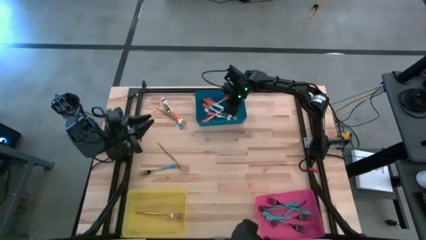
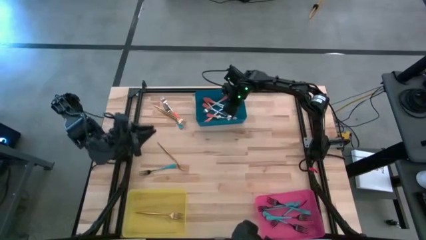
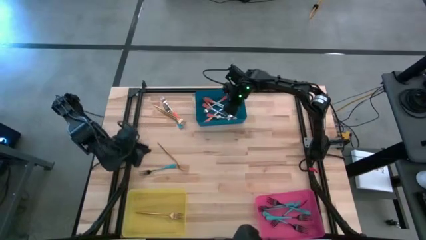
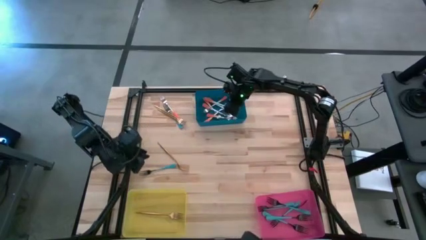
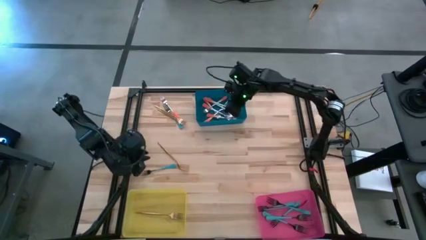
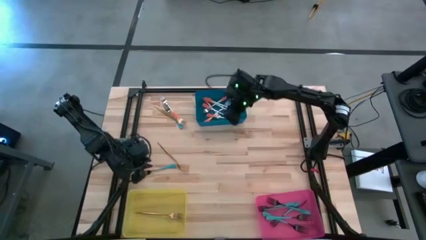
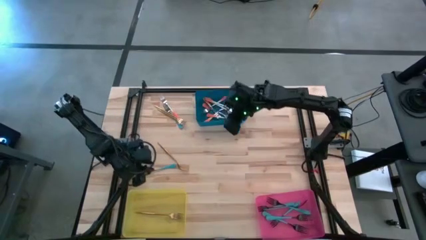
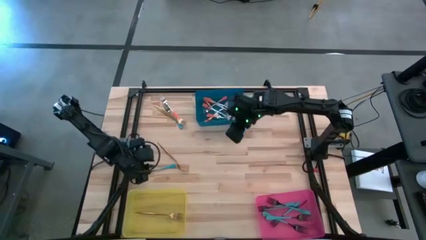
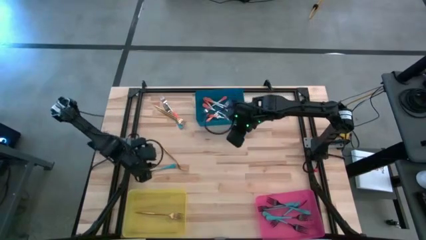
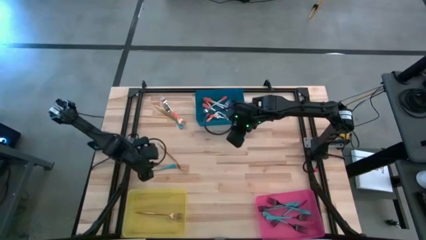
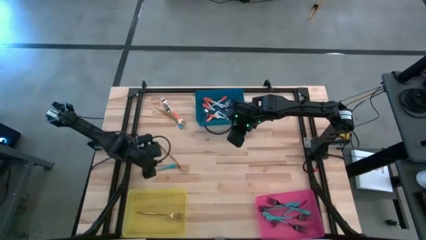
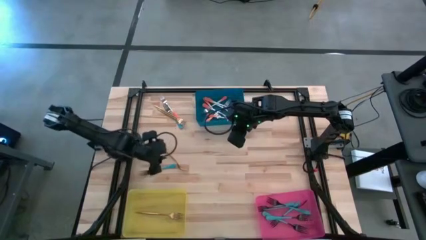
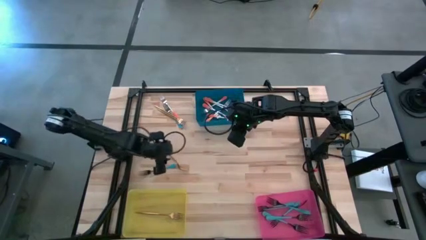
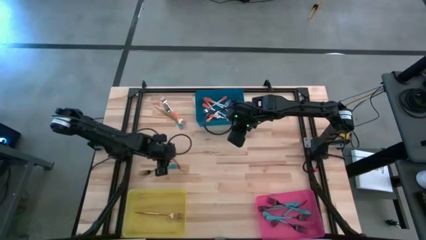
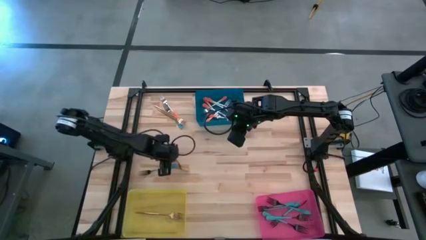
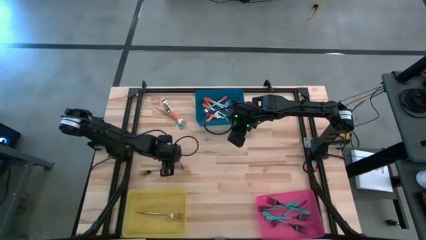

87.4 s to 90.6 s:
Task: Sort silverware by color (type)
Put the gold fork into the yellow bin

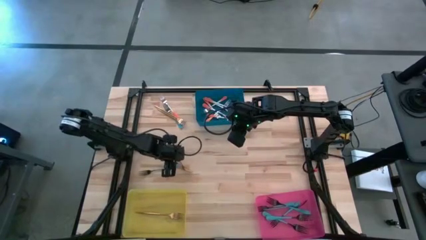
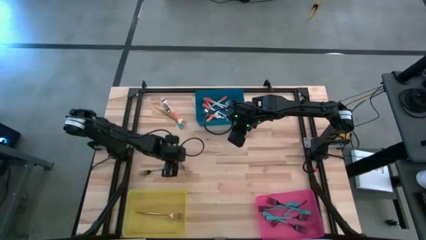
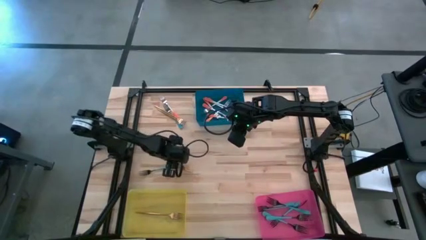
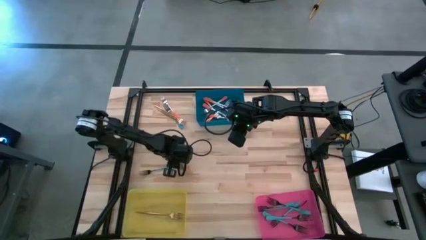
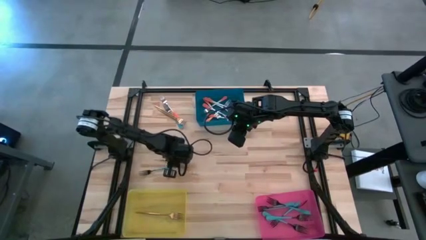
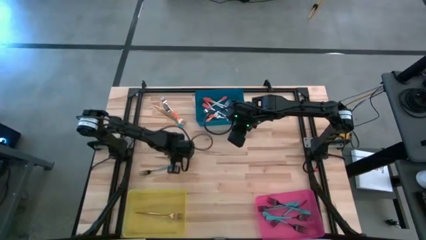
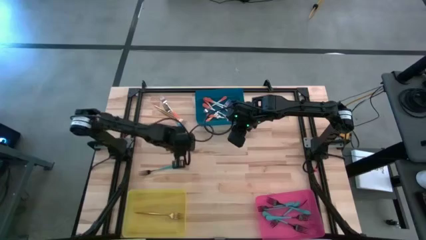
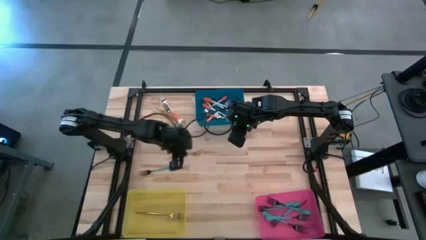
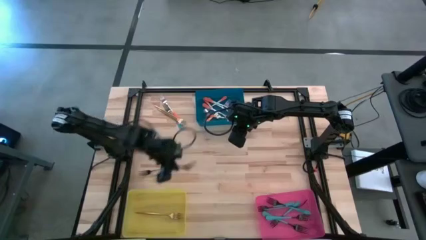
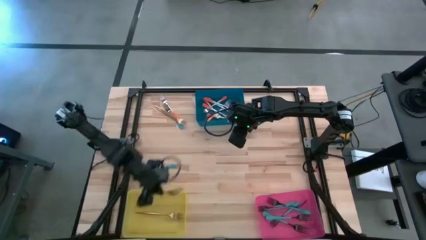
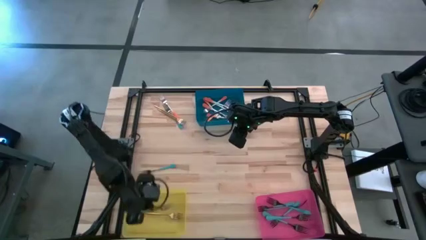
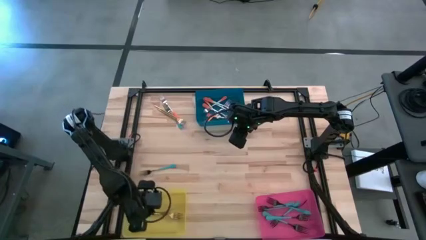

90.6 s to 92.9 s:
Put the gold fork into the yellow bin

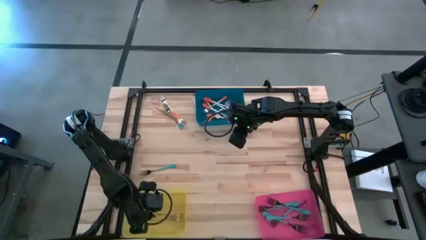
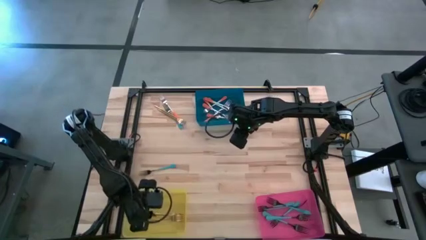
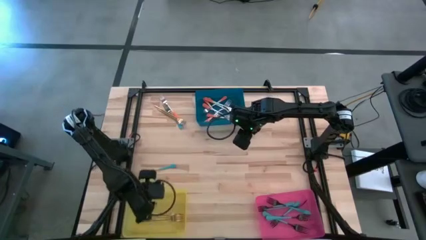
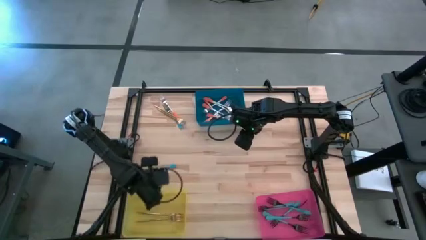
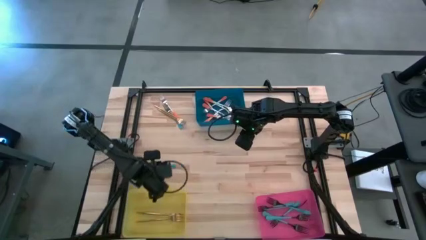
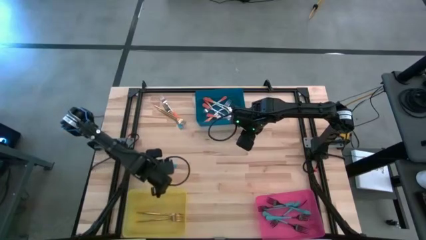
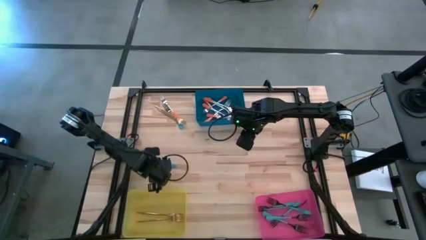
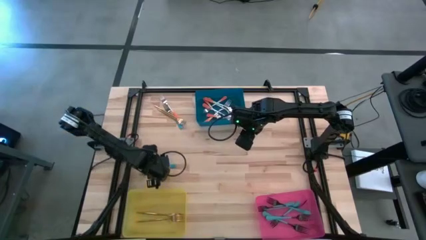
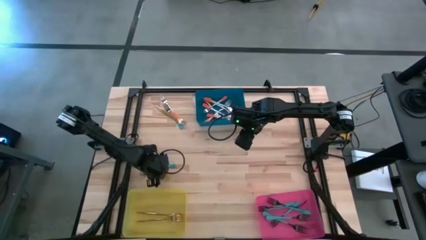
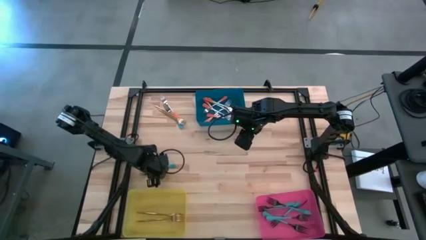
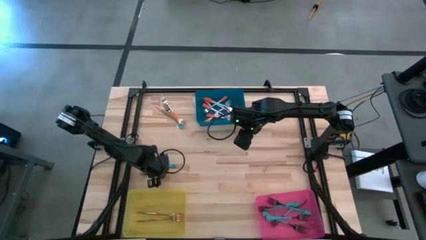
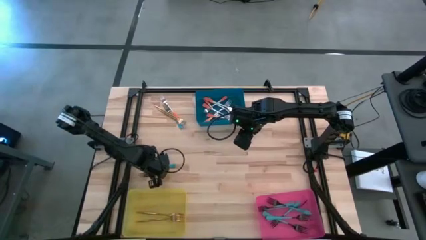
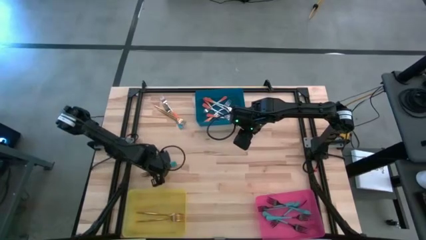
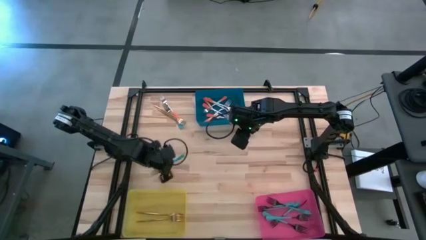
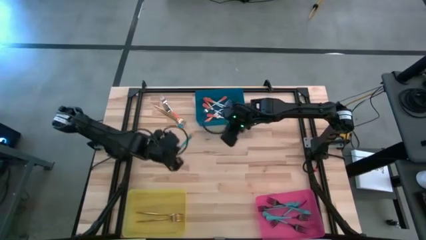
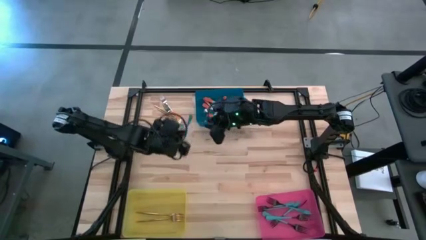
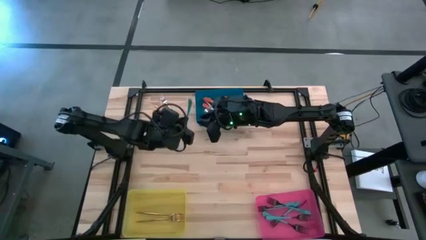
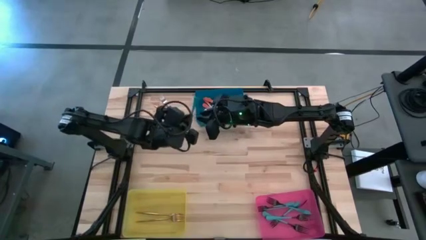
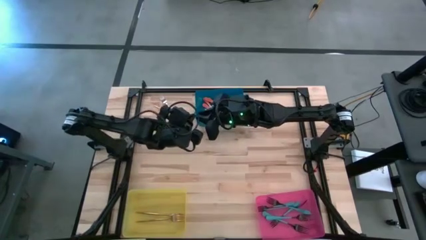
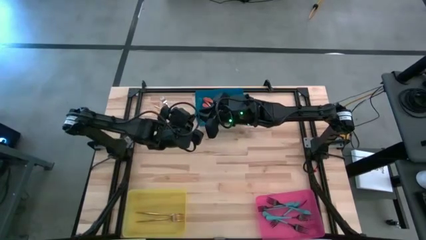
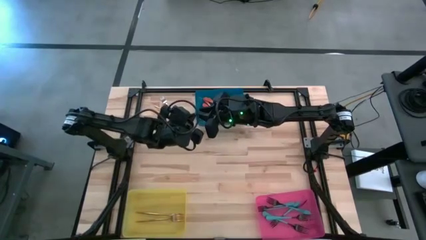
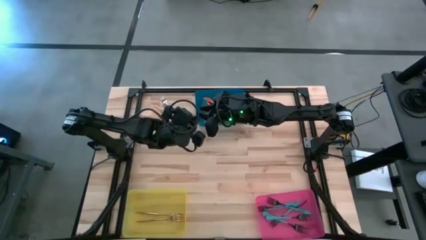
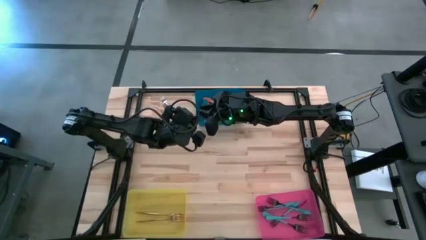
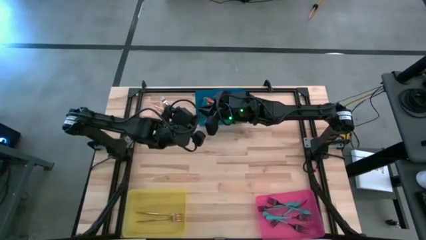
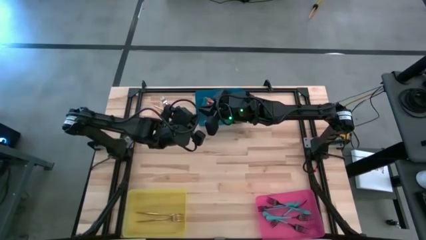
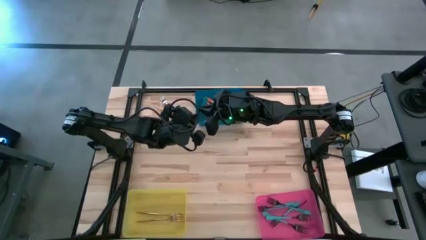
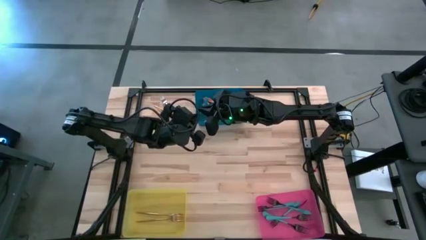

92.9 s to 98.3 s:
Put the blue fork into the pink bin

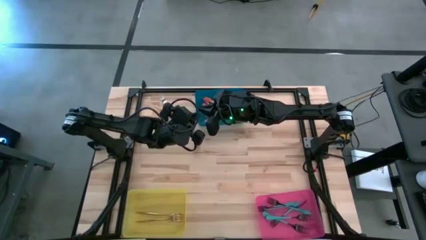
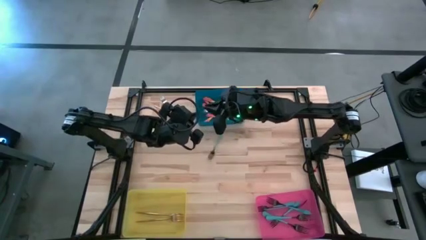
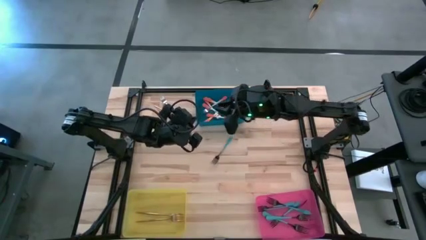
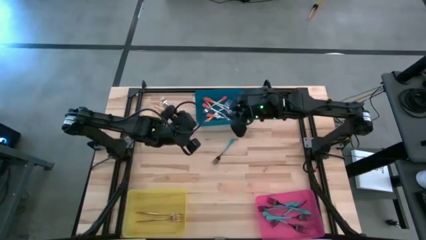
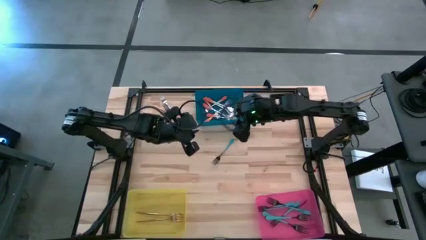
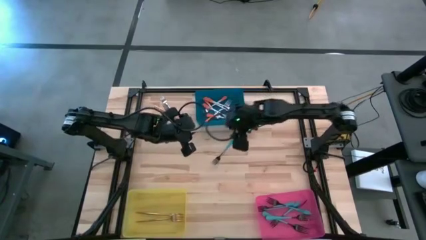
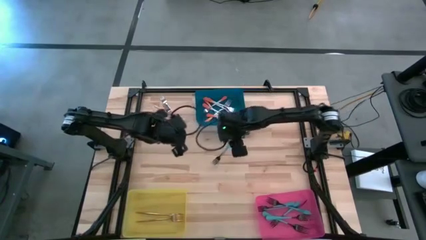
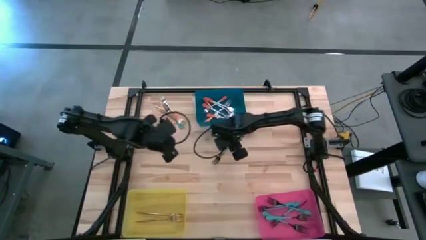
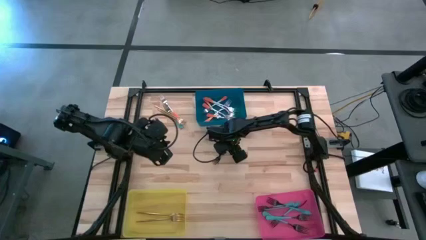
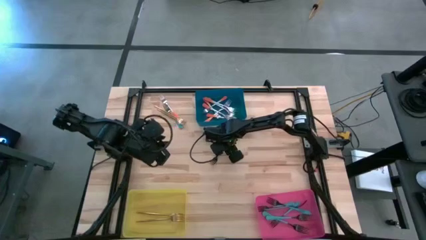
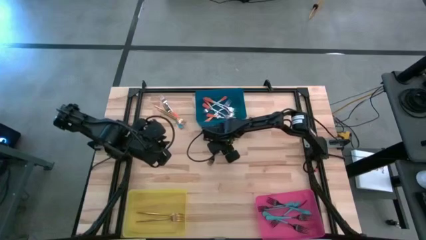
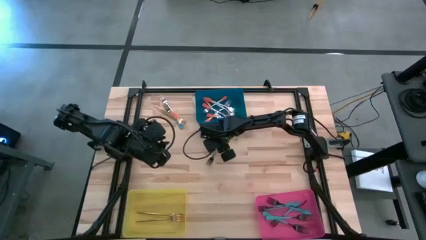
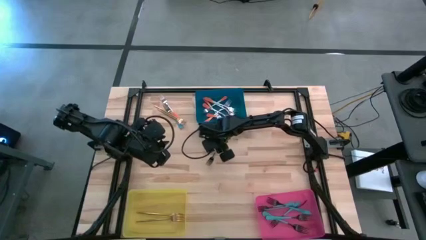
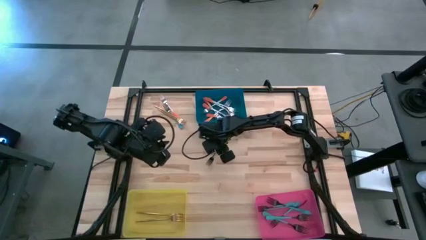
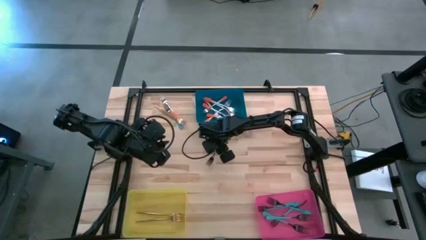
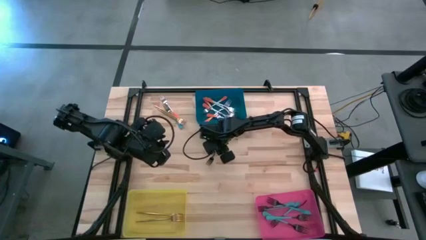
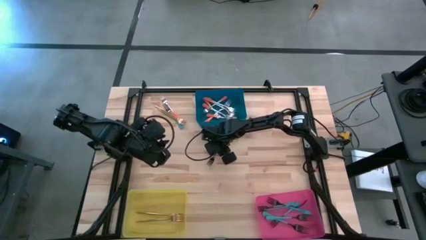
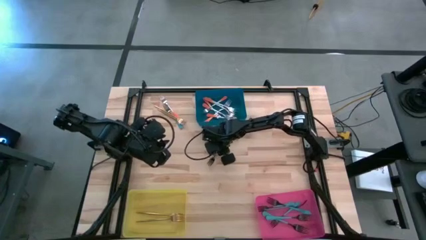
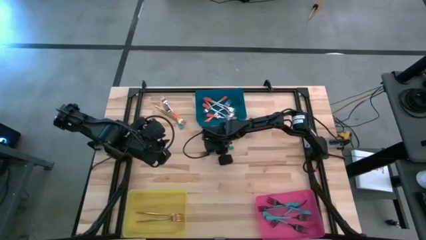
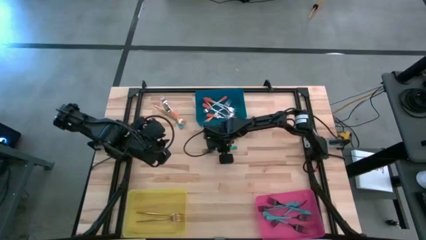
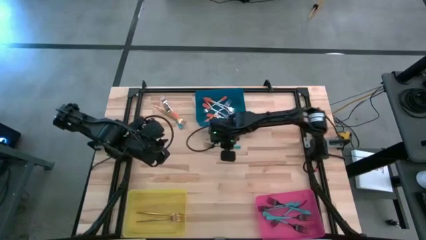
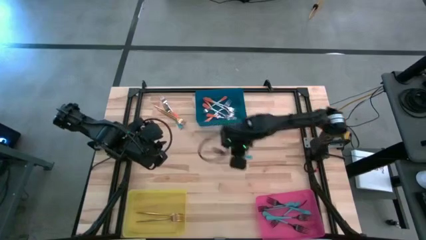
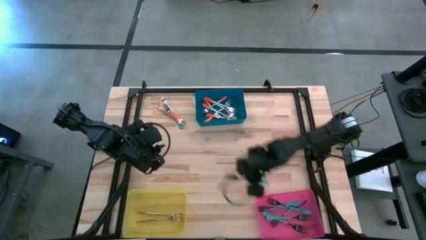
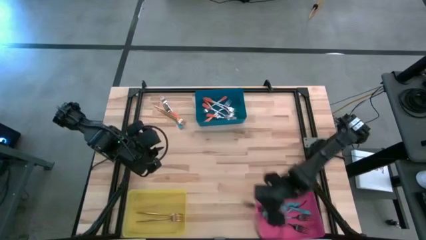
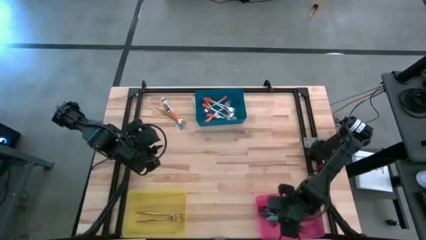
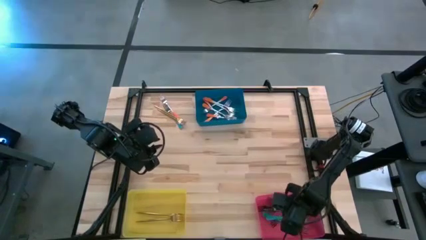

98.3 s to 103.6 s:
Put the blue fork into the pink bin

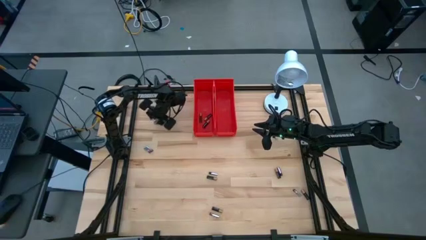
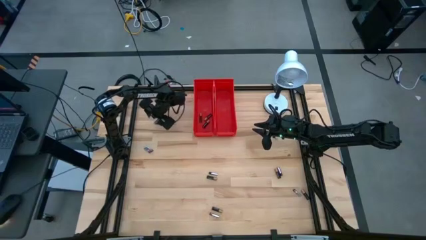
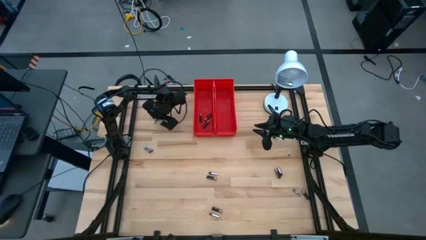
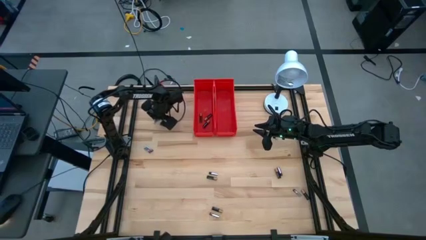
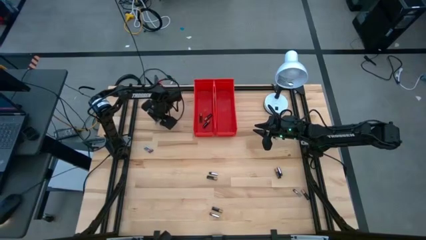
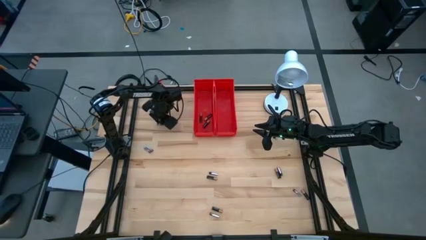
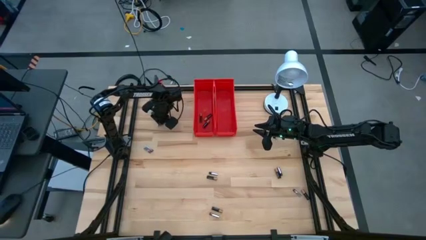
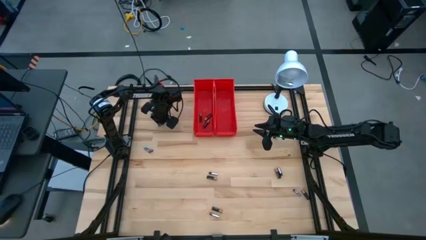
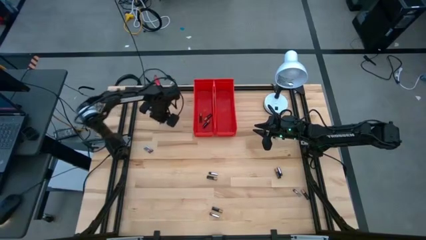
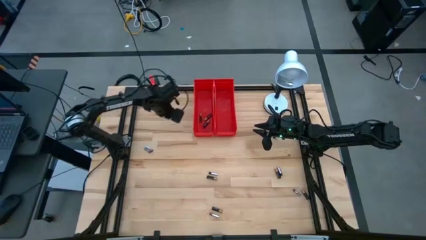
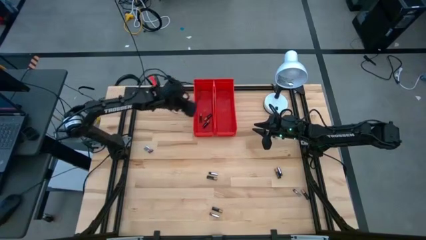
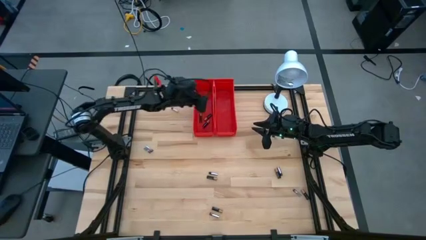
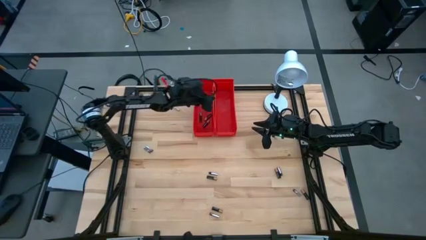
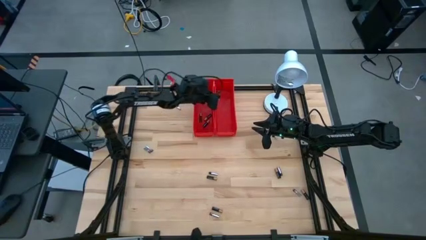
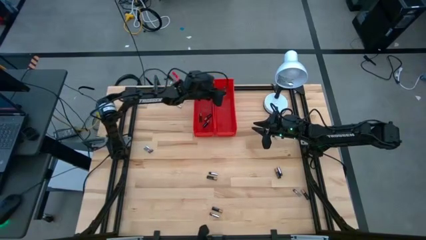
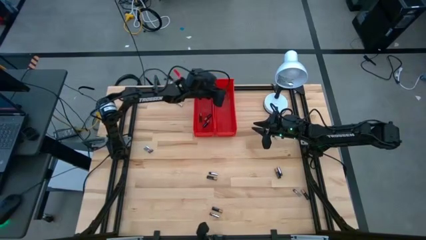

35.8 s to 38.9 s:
Task: Sort batteries
Put the silver battery into the right red bin
